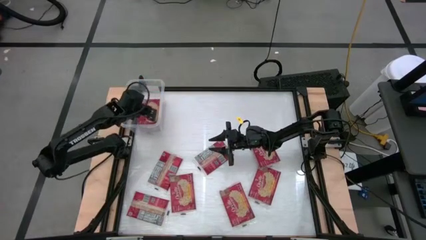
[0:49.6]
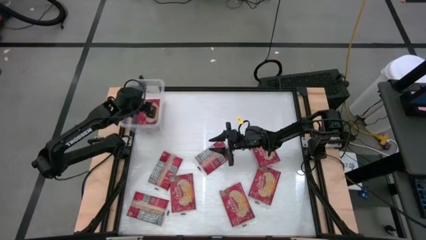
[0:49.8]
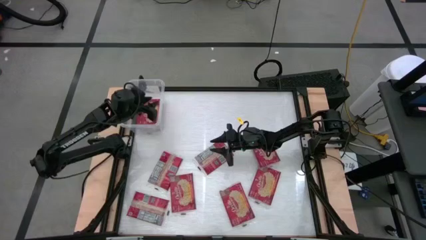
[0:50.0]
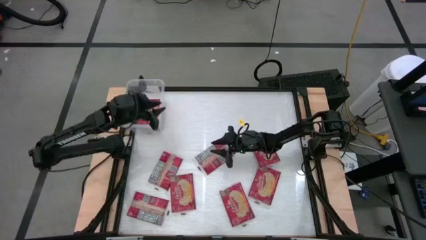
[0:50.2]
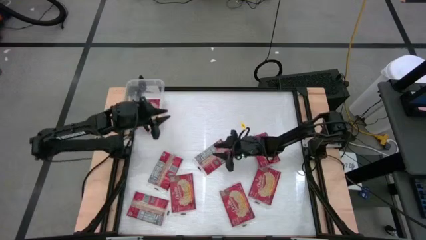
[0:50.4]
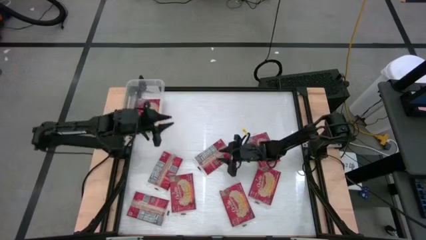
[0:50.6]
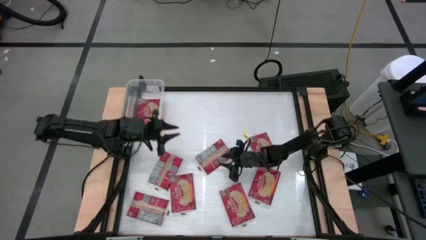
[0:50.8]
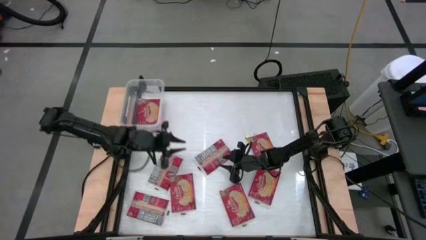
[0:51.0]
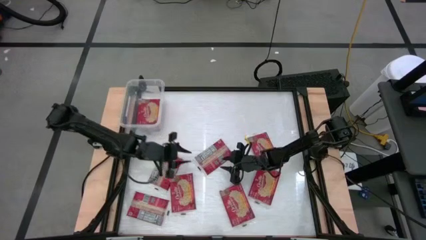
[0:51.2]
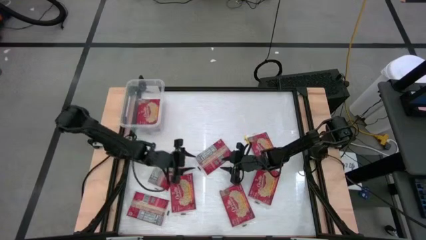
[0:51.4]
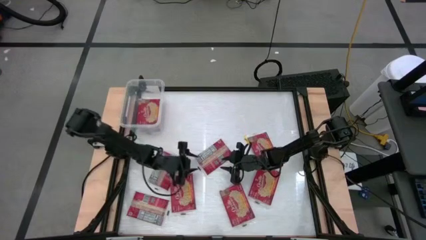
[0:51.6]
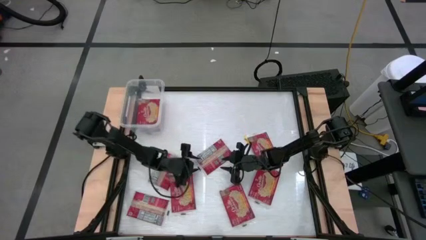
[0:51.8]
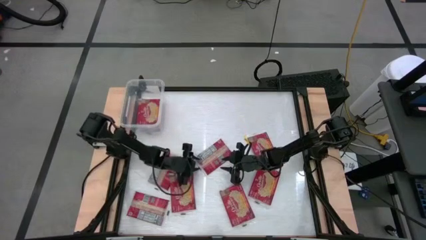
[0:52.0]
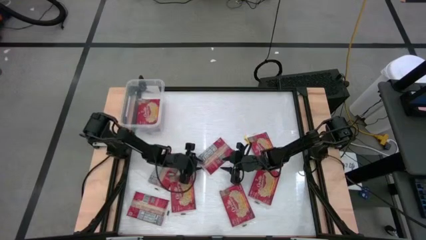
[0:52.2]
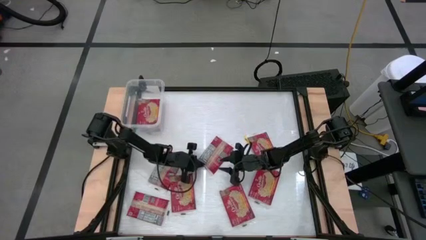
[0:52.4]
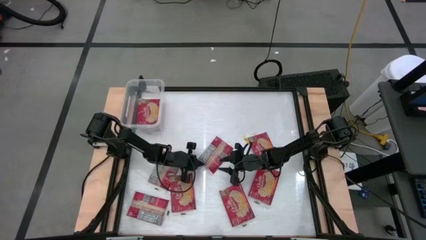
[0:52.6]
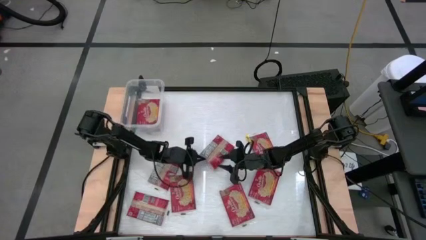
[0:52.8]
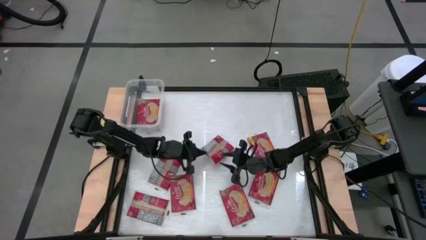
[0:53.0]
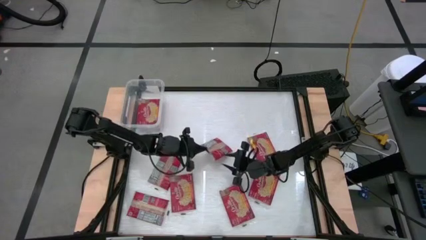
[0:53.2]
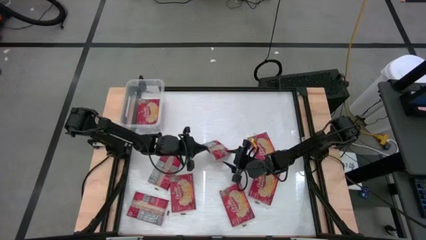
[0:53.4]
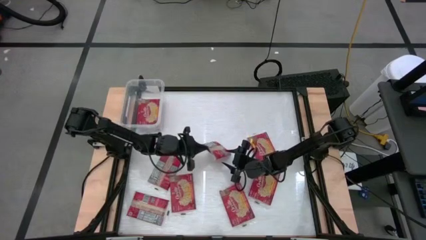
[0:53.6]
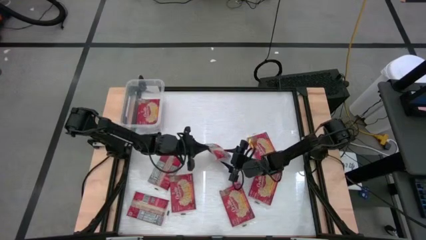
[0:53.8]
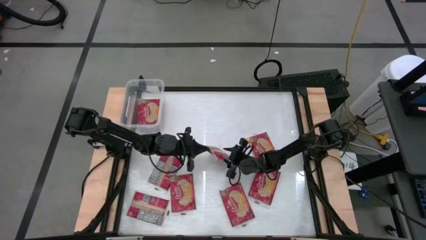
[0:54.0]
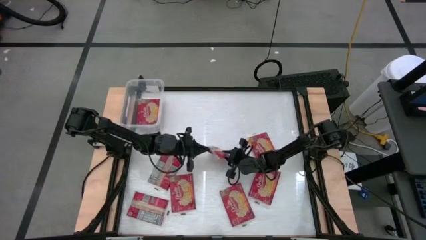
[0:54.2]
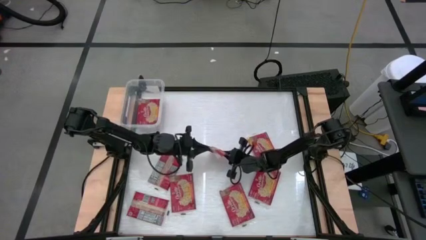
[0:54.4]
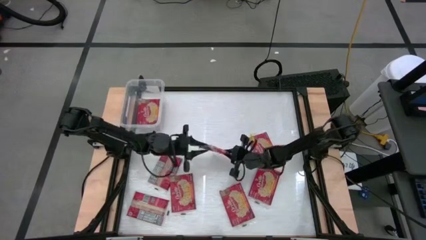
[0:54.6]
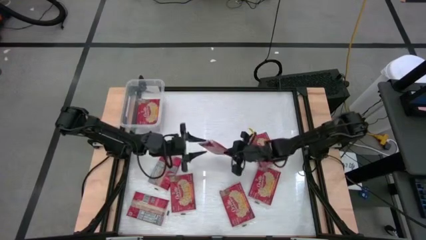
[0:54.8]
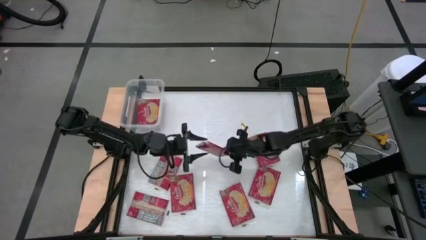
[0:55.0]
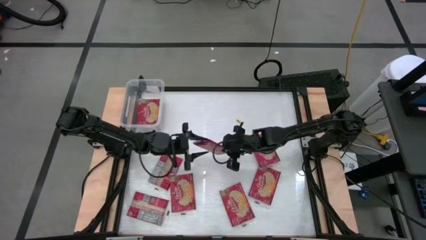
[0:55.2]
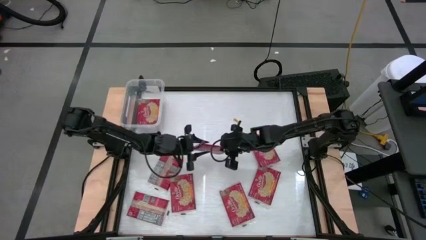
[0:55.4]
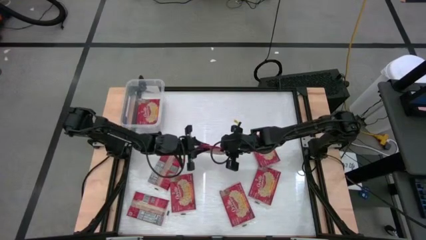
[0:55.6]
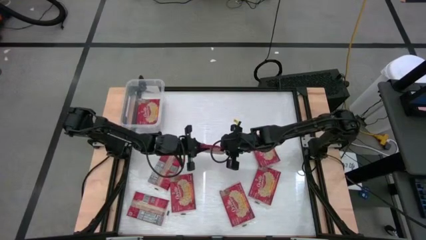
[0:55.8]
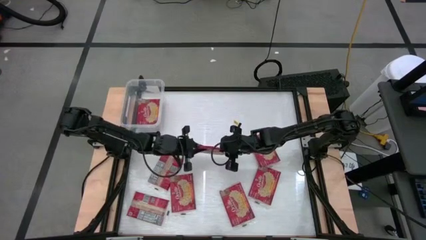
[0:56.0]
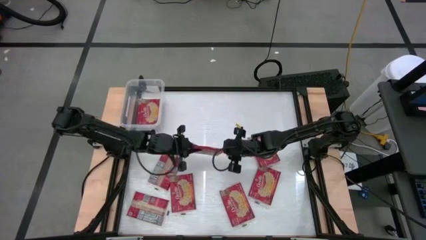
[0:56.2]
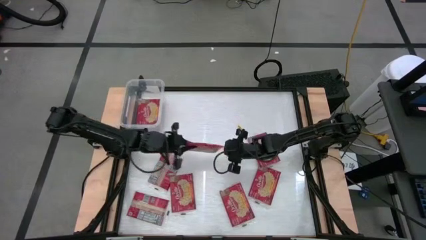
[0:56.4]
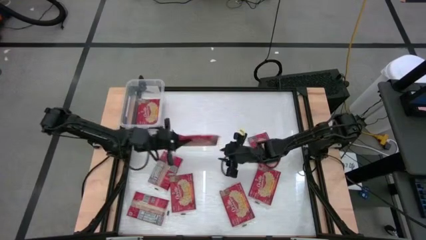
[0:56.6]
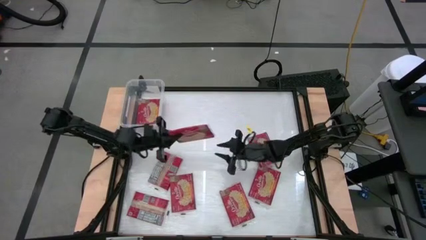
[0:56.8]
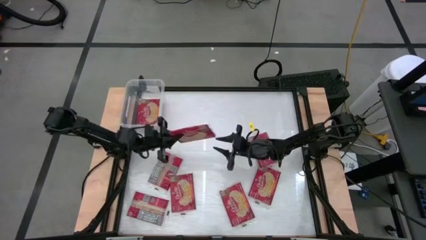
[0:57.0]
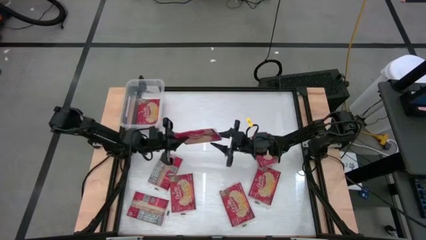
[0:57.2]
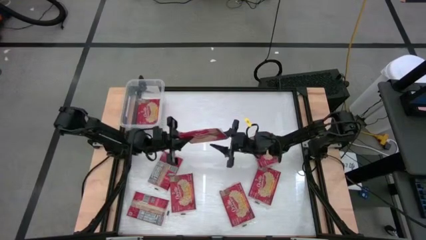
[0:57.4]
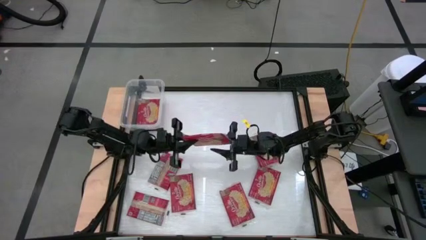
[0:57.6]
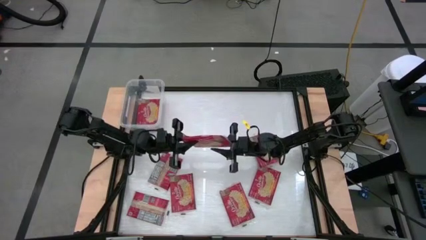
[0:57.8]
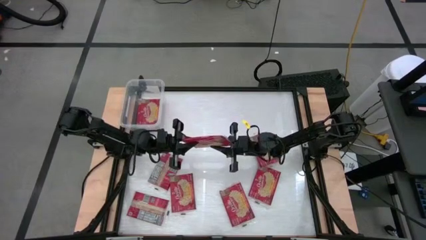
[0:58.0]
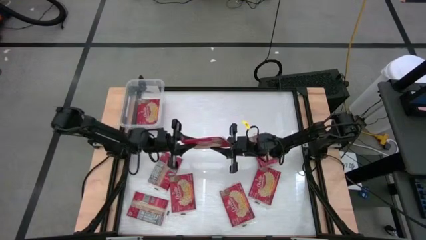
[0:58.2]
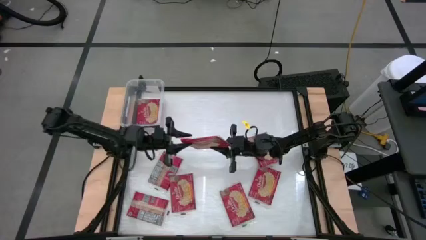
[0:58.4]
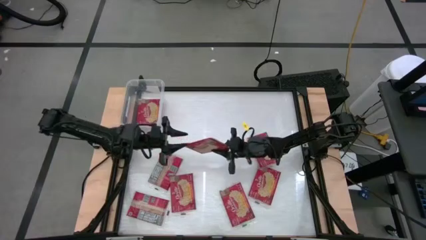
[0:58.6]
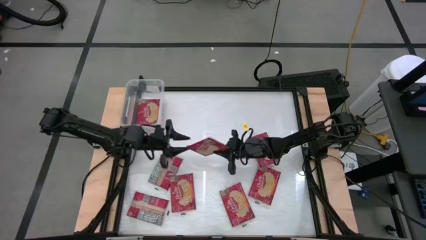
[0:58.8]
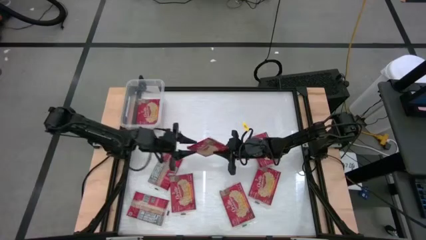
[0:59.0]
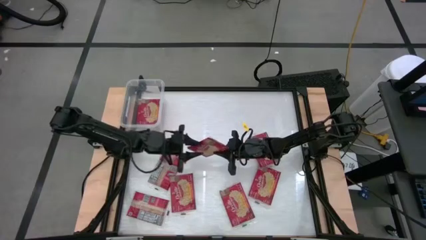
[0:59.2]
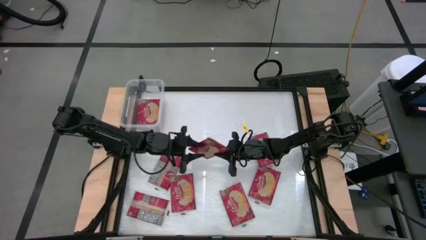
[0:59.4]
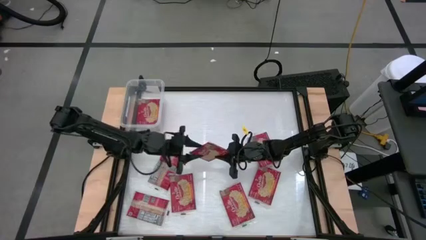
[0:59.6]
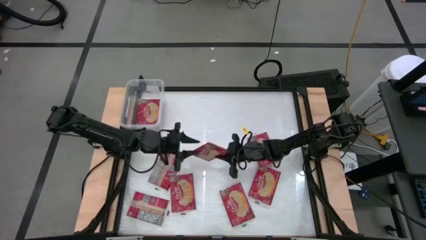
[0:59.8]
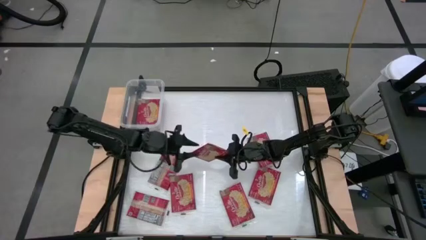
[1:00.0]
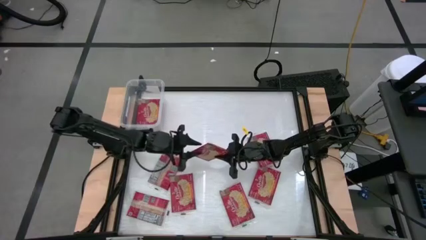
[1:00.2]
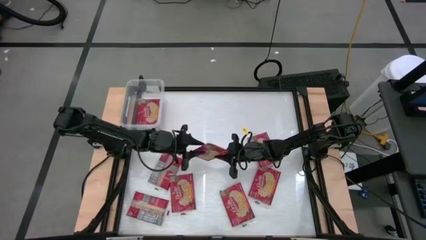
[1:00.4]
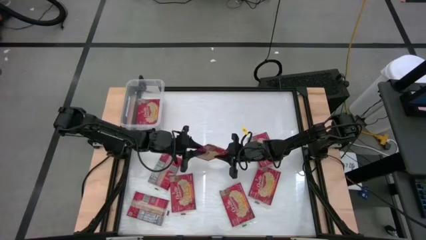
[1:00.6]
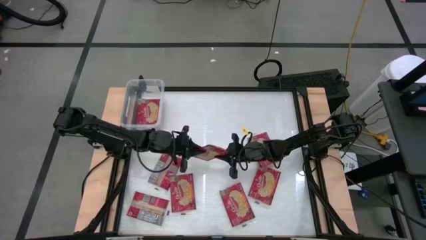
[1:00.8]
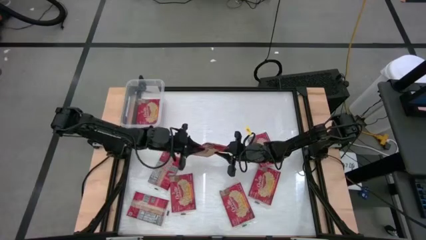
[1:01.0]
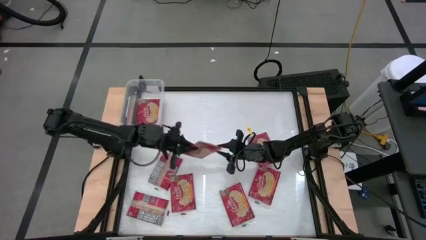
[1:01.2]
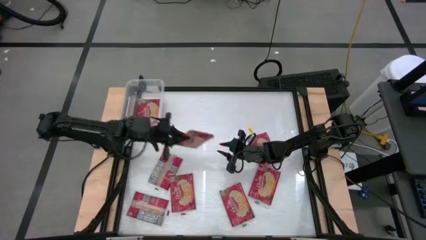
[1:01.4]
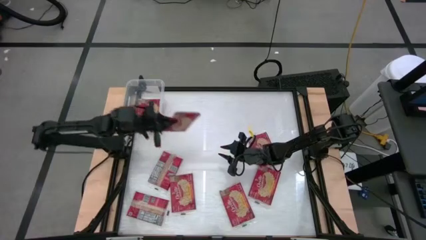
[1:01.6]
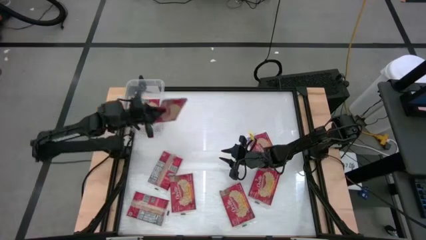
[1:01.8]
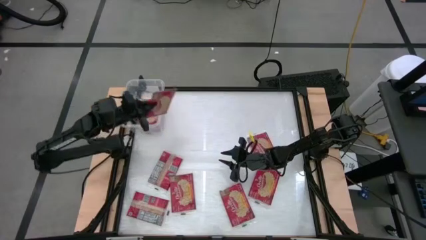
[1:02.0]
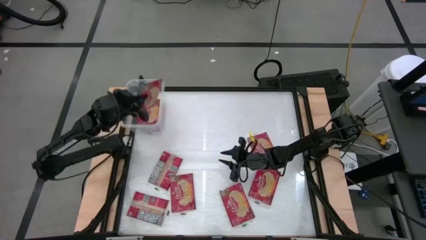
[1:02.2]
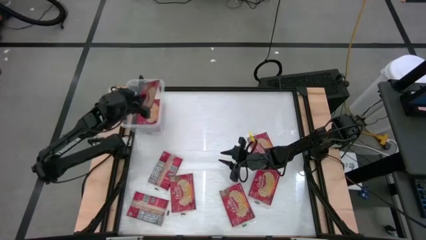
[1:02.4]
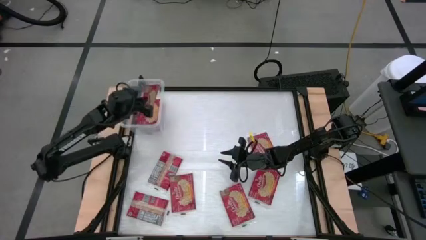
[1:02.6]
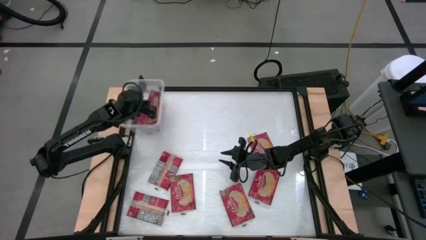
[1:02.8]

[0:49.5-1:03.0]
Task: Sort popcorn bags into baskets
Stack the red popcorn pack into the bin

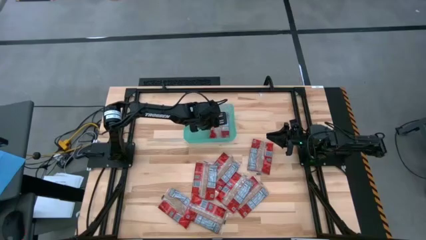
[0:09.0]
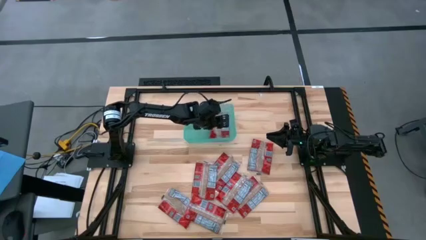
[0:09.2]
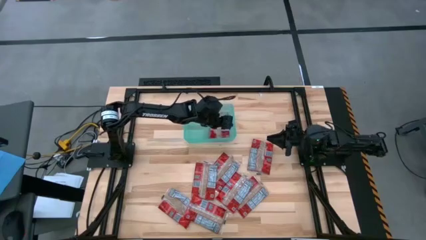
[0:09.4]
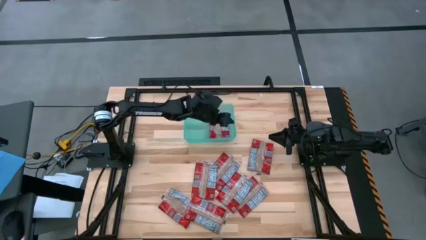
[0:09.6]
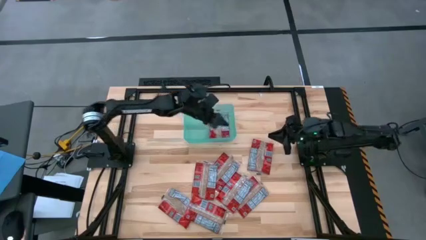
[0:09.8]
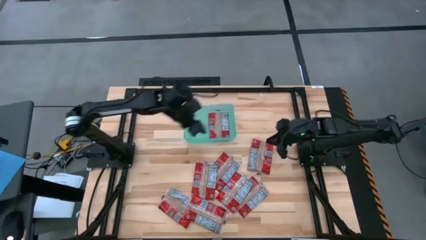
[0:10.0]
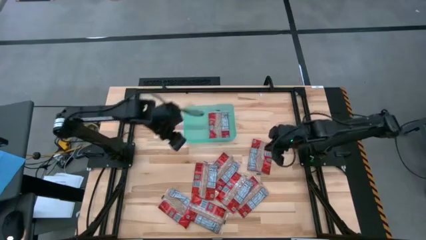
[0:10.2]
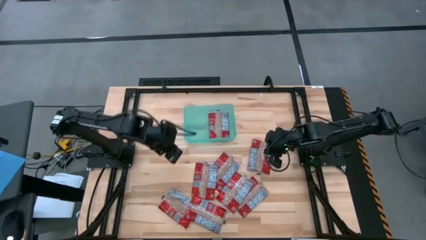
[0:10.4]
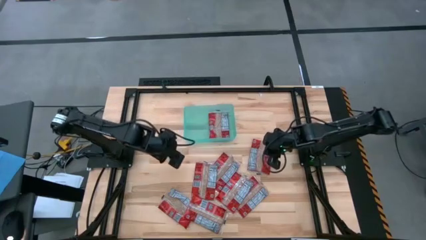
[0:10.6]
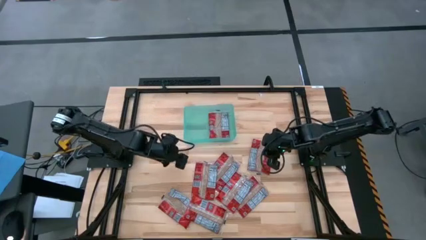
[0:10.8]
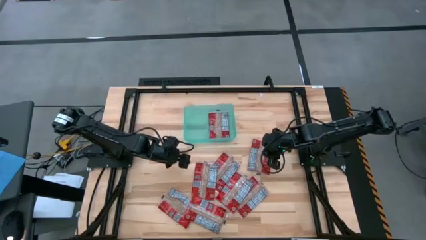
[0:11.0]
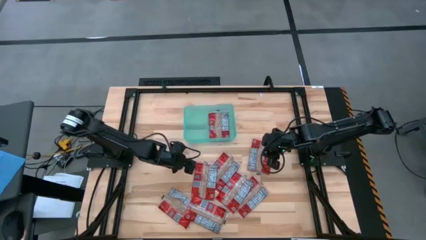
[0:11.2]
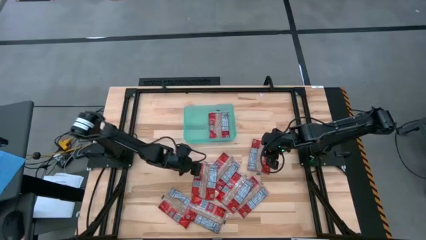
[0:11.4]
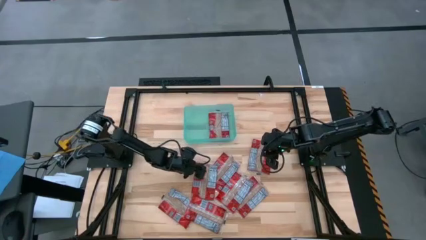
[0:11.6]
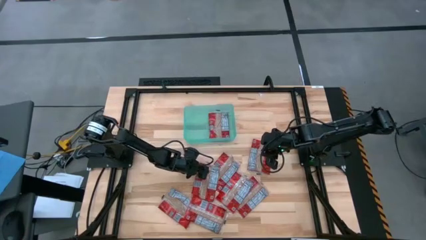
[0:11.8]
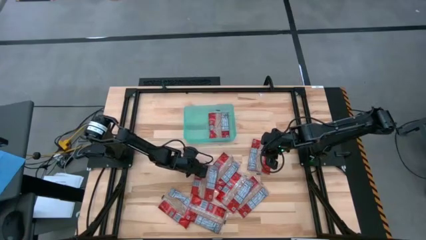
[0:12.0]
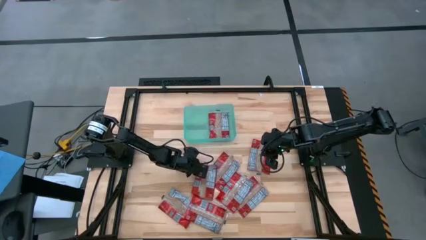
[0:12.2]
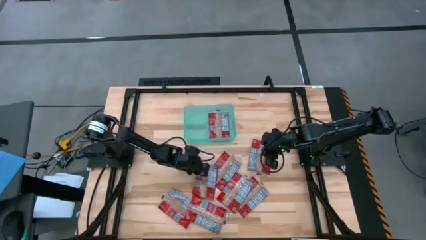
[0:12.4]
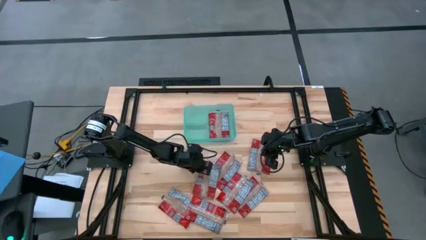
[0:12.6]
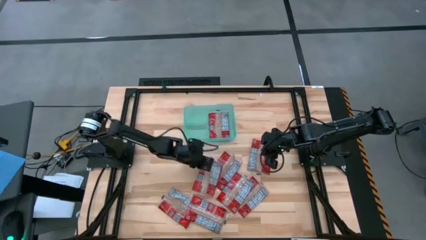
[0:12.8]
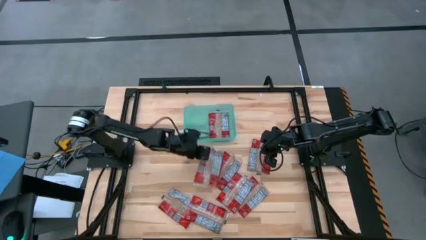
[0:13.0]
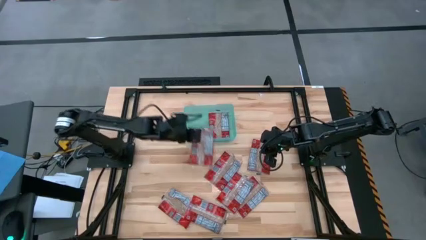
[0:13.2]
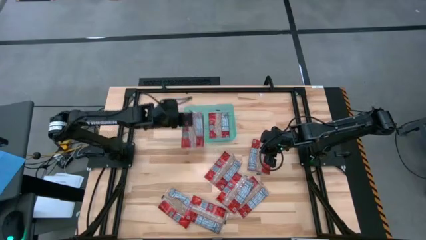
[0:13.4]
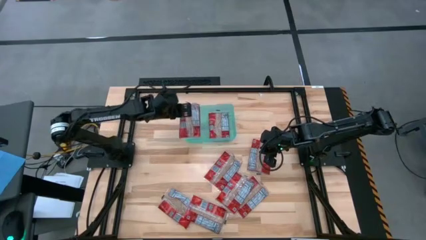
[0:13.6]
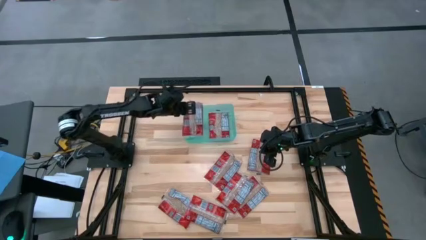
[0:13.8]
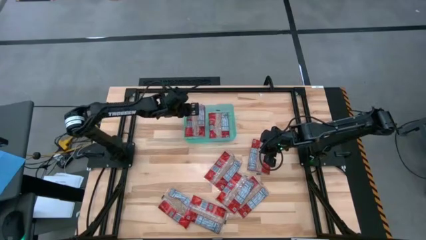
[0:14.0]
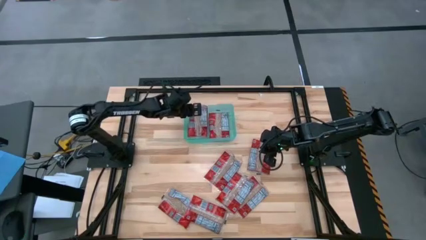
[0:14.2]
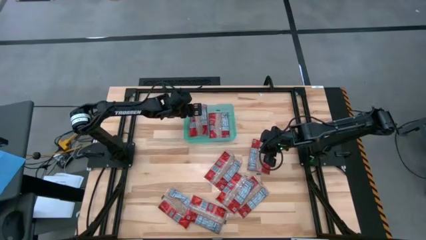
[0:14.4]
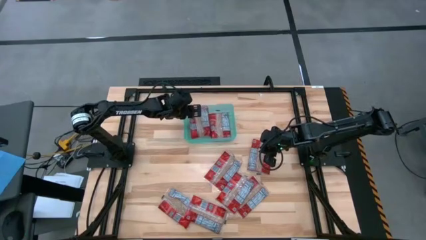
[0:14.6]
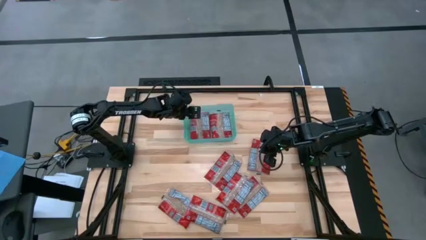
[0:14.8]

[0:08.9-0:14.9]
Task: Sort popcorn bags into baskets
Put the red popcorn bag into the blue bin
